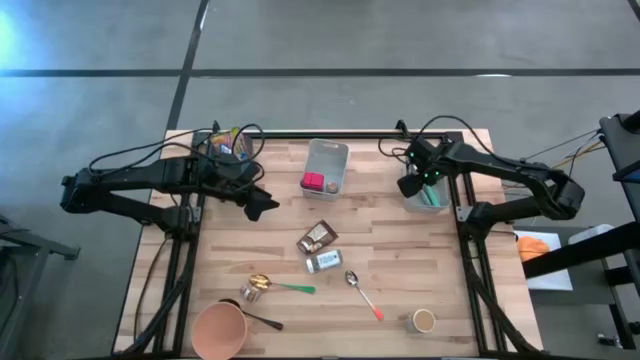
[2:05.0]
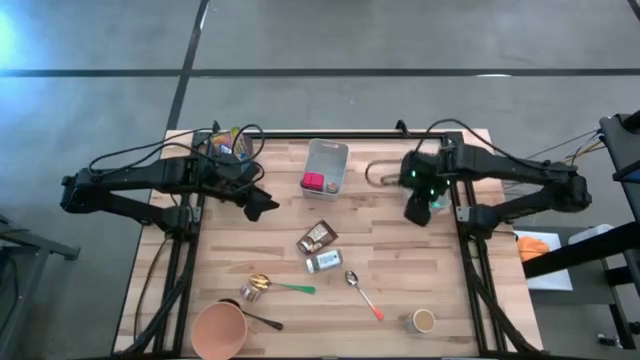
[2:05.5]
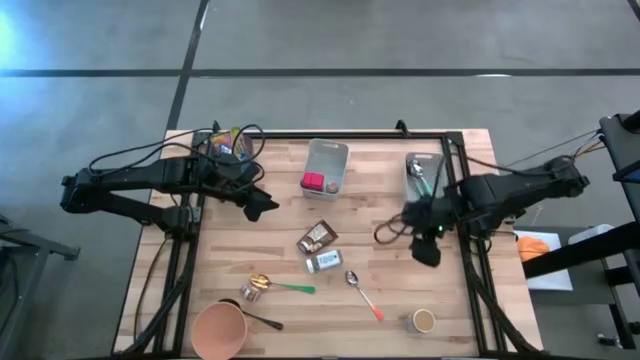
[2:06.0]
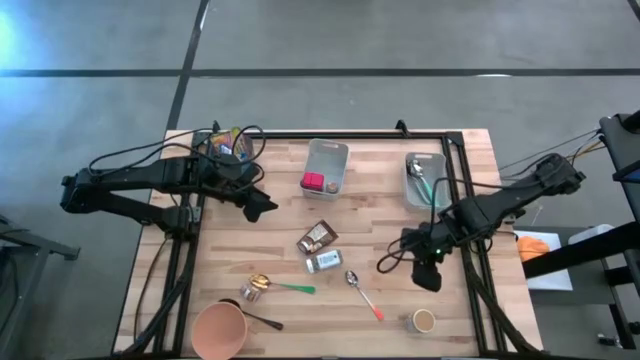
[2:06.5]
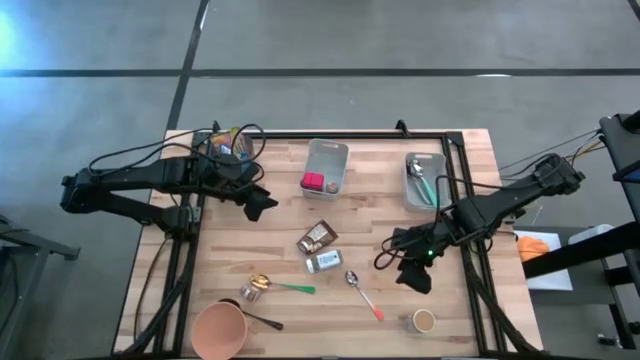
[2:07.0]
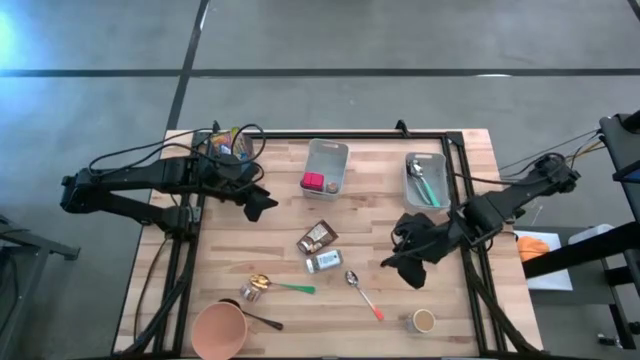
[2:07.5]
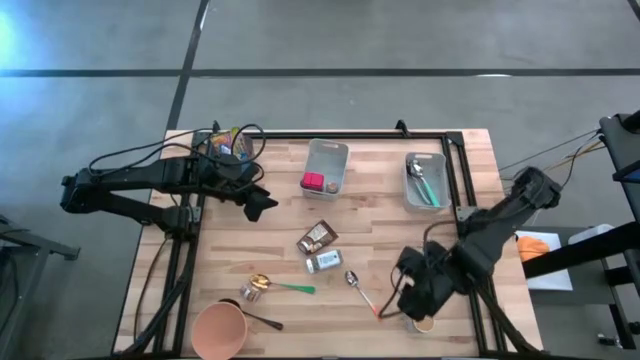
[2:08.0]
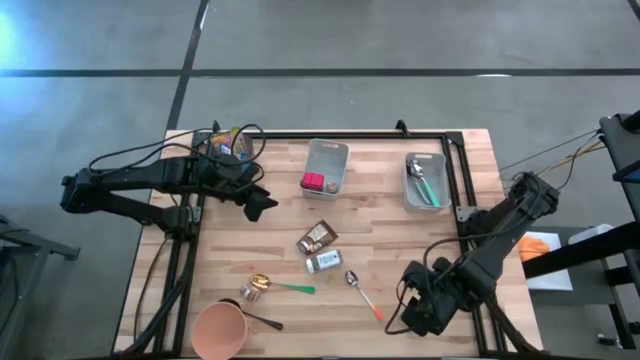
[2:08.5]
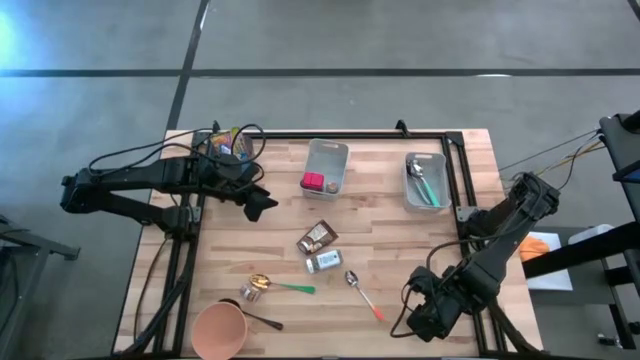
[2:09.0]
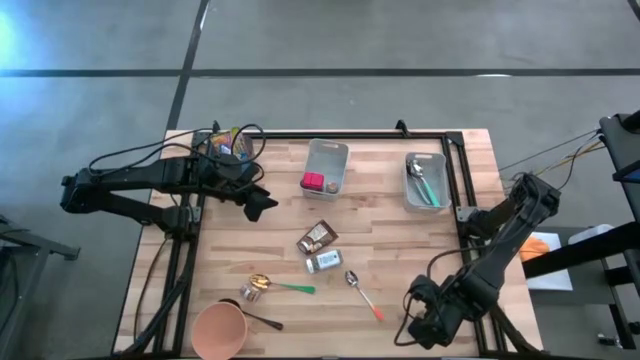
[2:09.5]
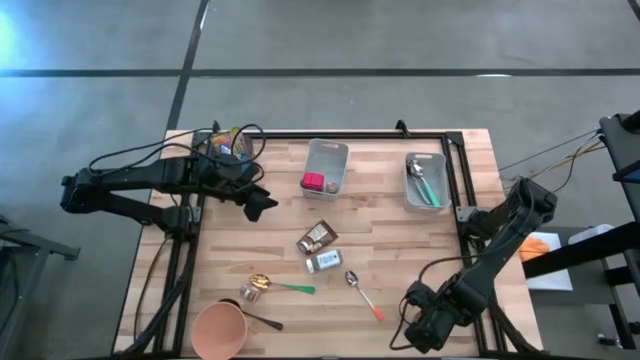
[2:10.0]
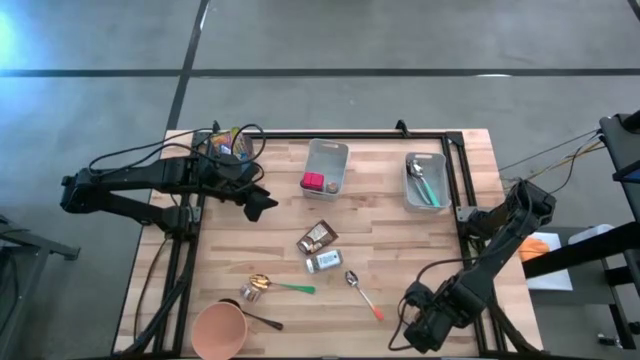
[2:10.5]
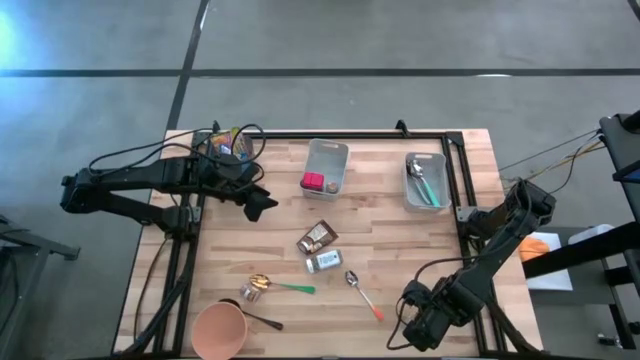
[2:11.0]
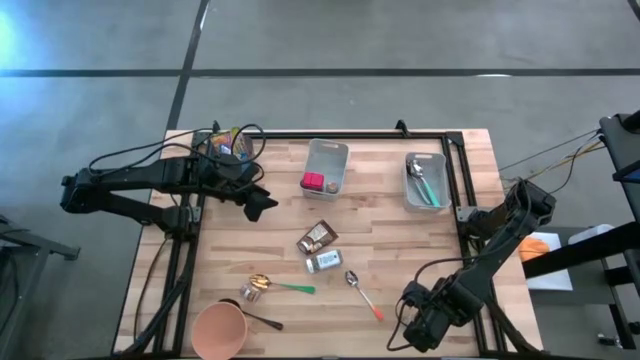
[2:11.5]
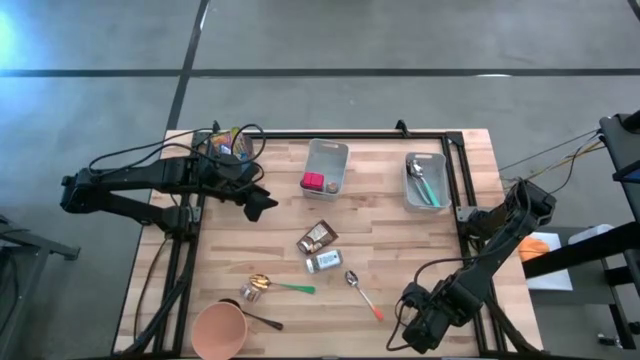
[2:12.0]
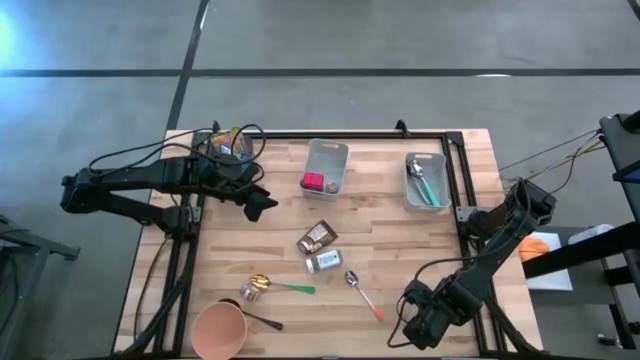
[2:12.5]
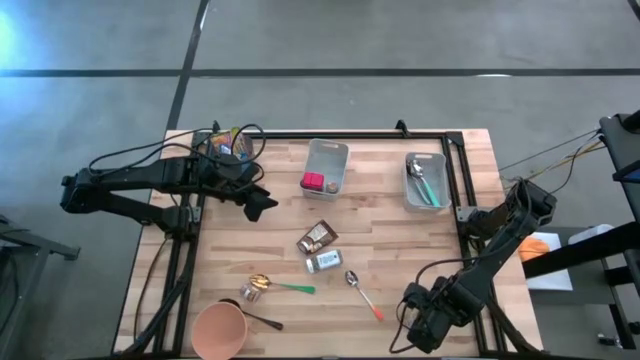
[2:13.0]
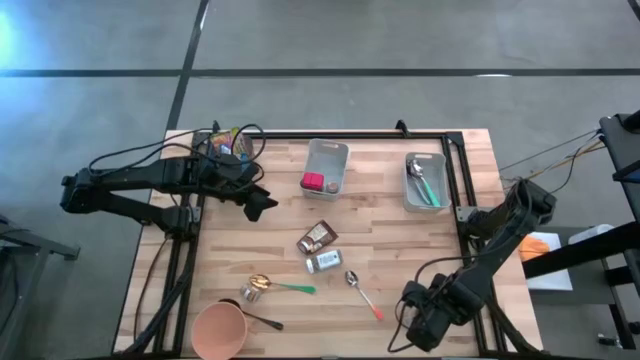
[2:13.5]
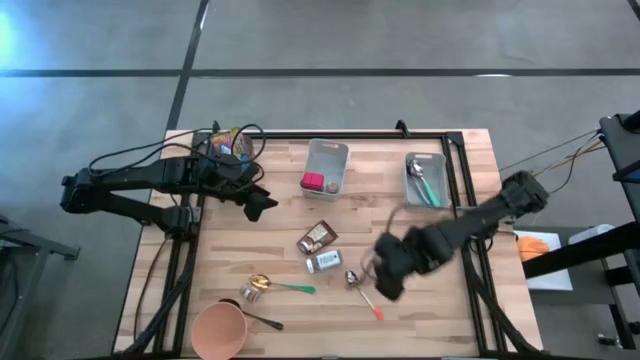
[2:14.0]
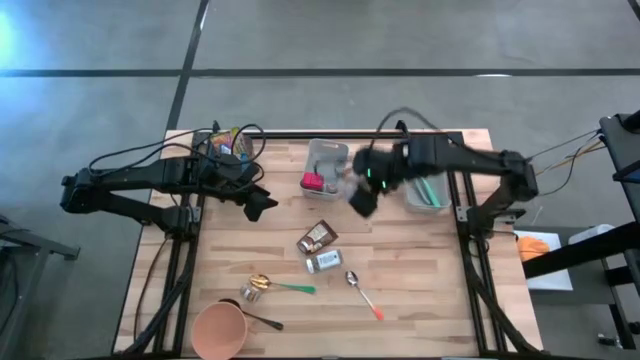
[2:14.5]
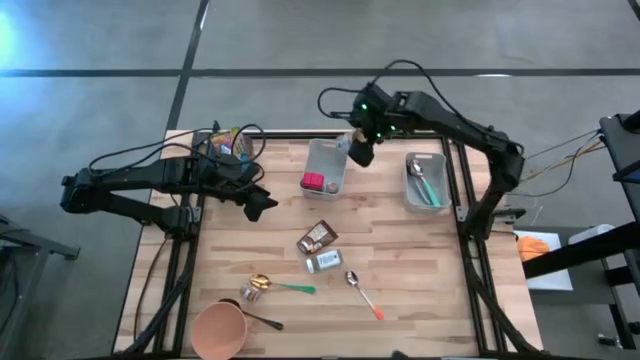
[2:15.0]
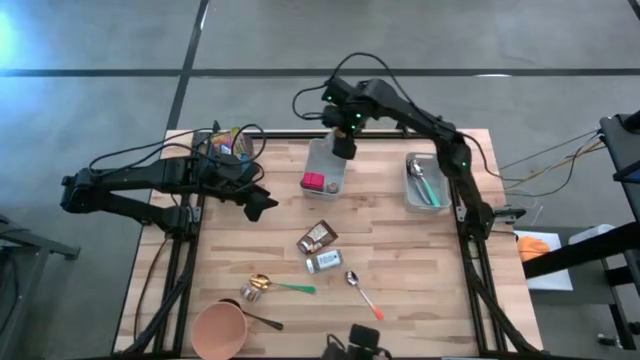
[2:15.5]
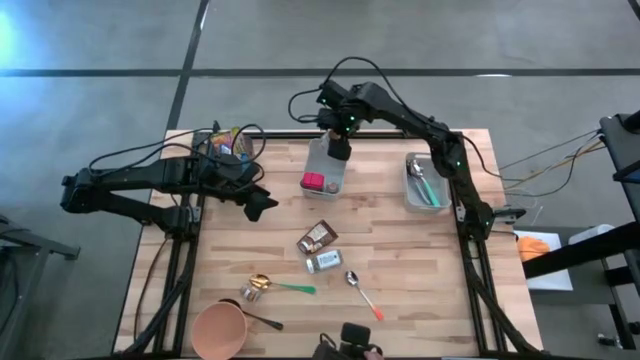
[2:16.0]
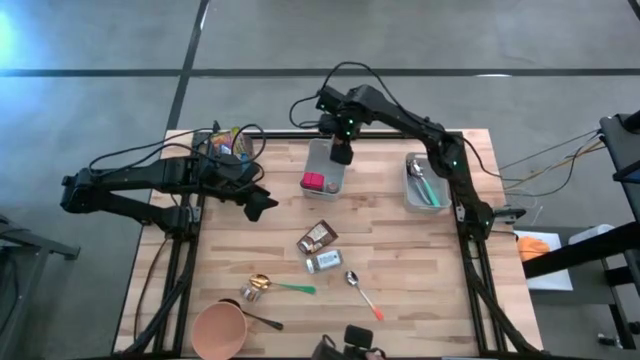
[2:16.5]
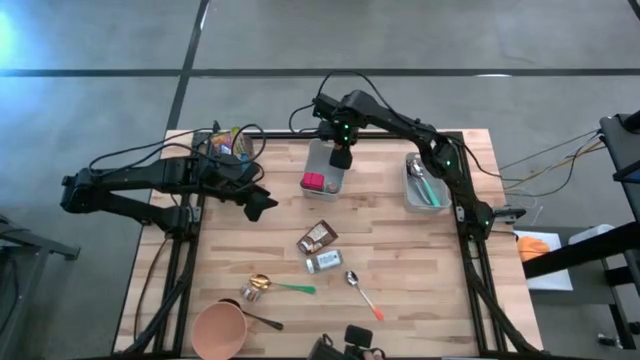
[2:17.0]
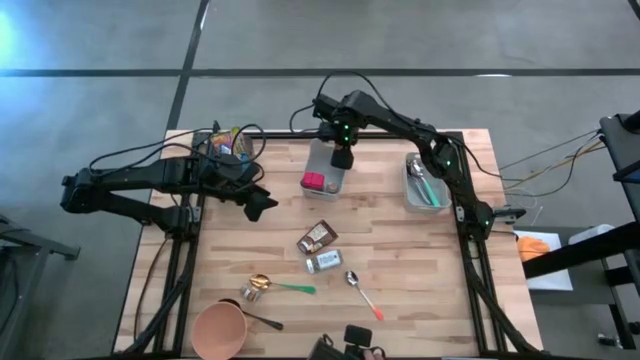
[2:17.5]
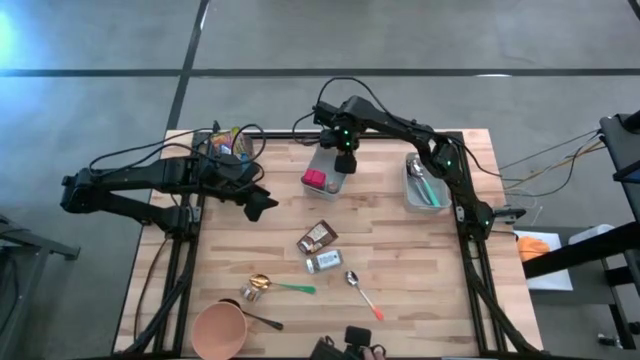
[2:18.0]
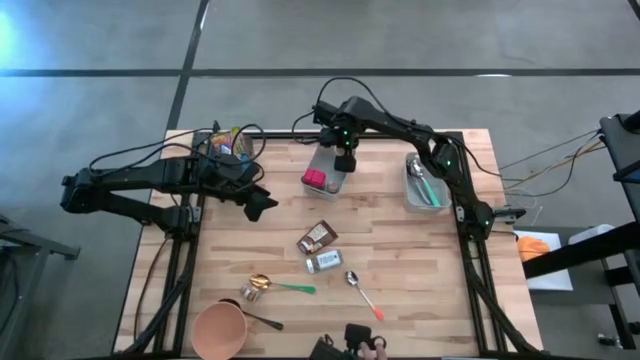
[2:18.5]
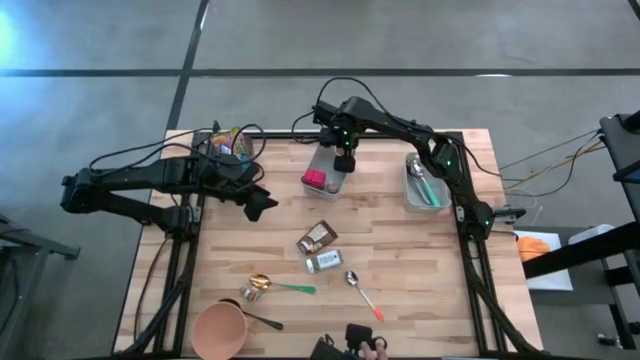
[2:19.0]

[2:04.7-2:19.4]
Put the gold seasoning bottle into the left gray bin

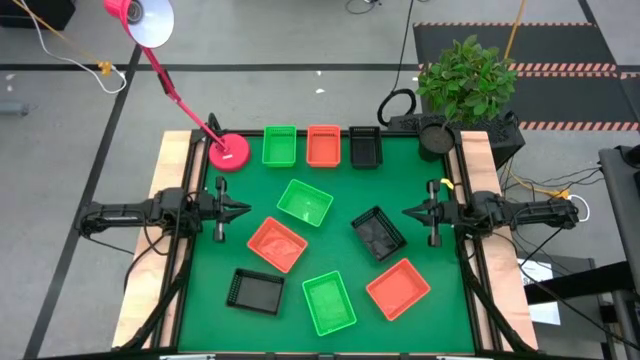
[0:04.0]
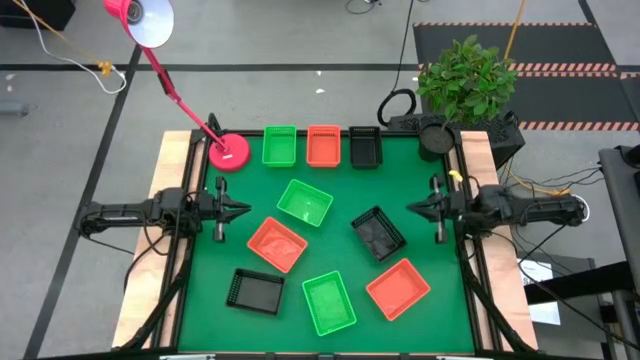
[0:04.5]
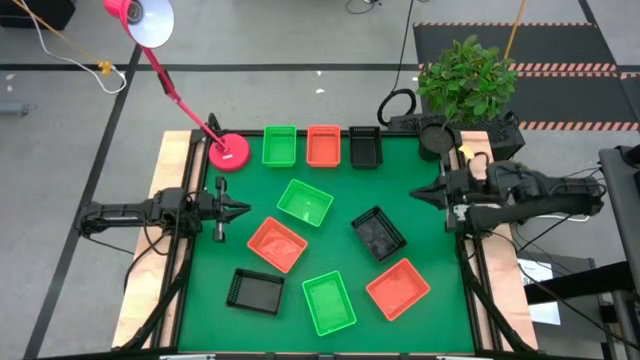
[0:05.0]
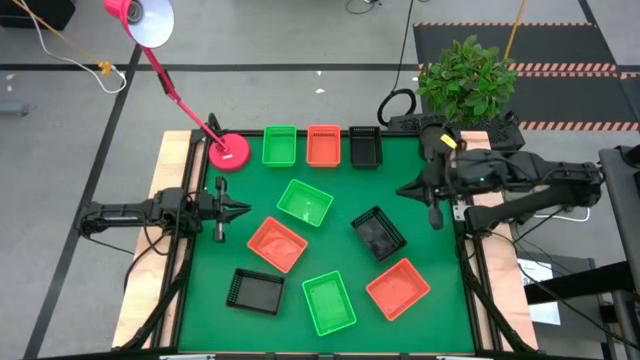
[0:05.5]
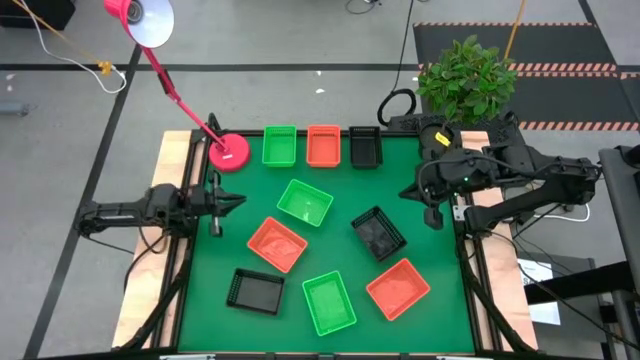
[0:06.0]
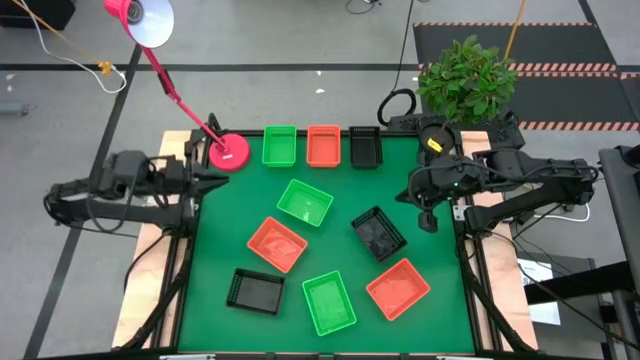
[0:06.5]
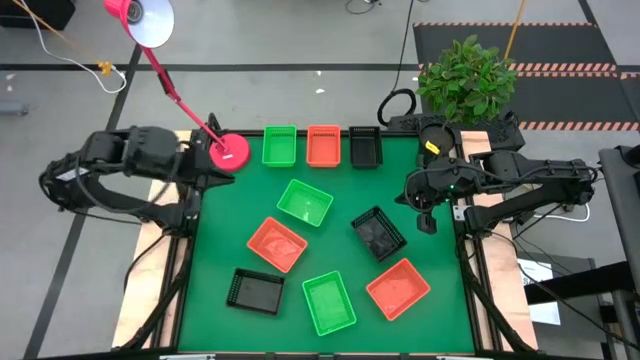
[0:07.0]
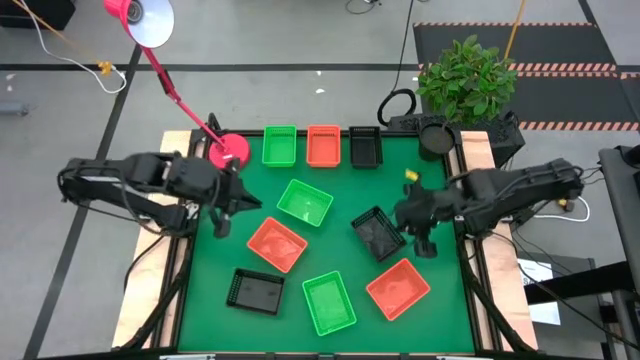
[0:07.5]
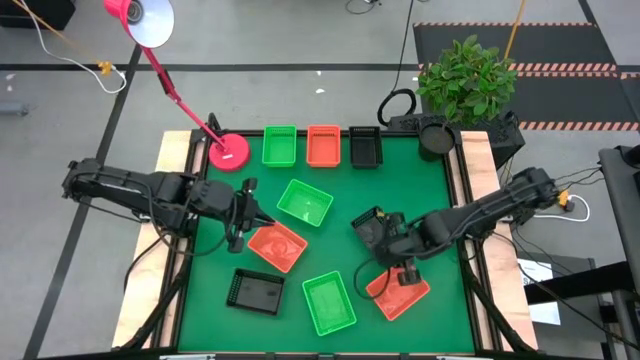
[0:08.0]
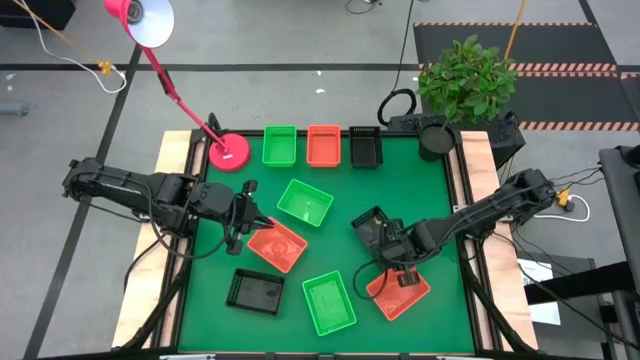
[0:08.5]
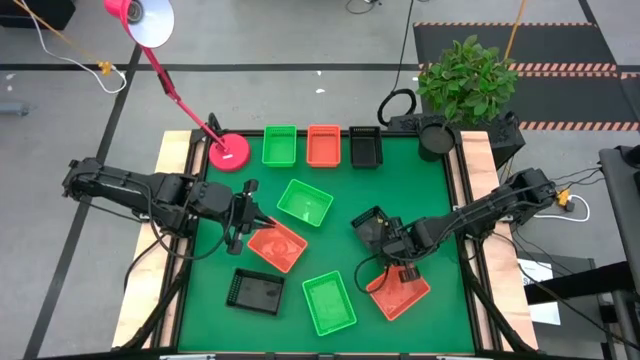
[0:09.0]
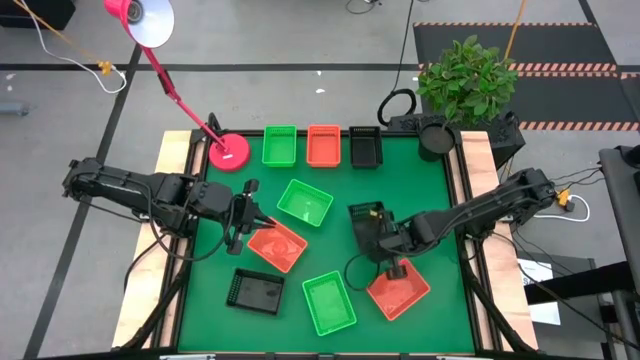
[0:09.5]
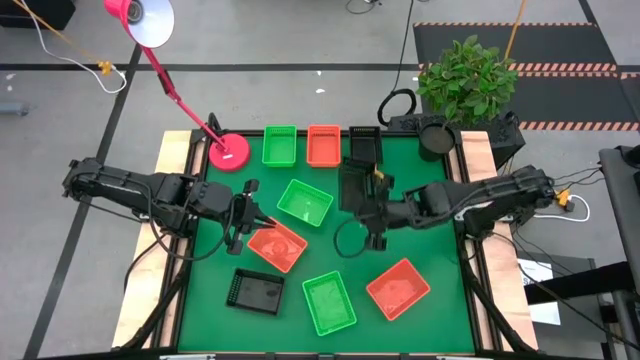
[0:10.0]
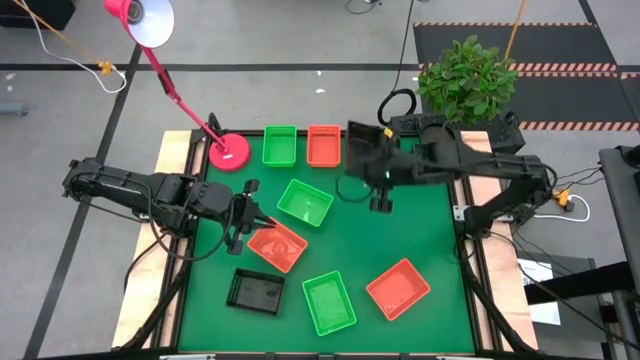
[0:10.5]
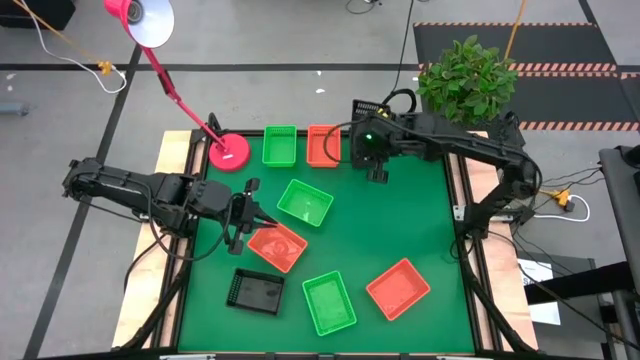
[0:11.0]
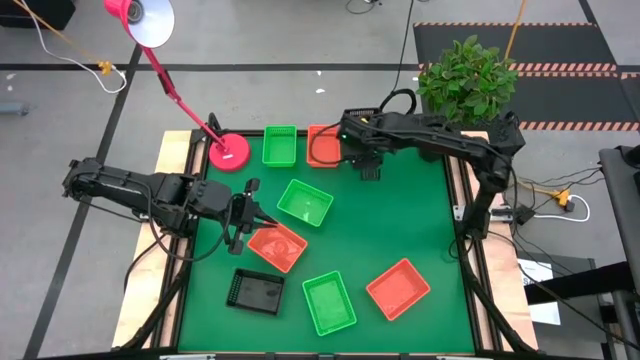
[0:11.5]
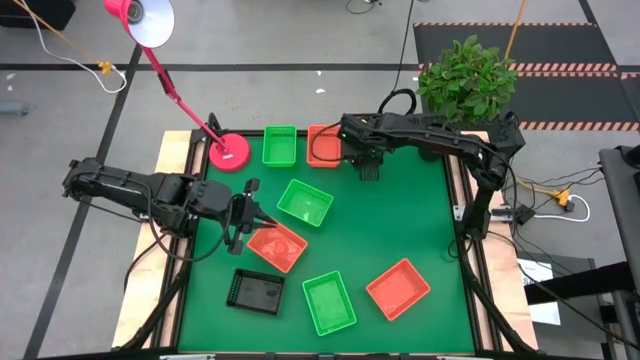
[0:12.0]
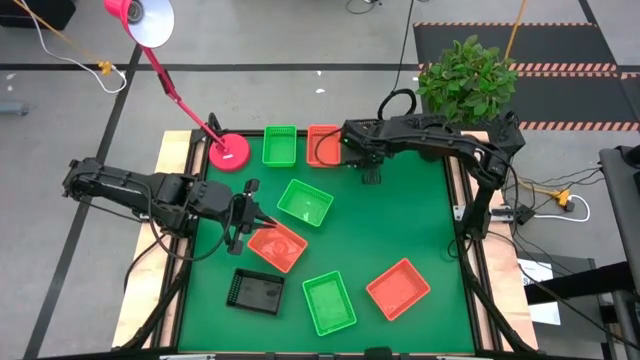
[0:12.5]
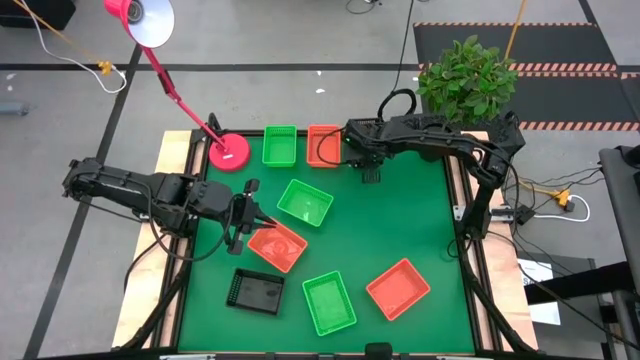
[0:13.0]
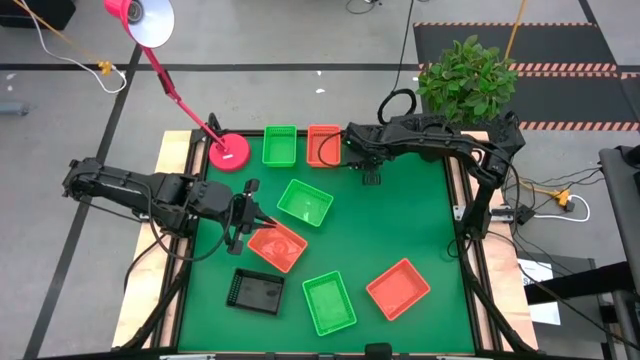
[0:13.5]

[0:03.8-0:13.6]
Stack the middle right black basket on the top of the top black basket
